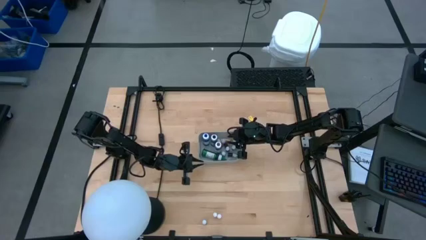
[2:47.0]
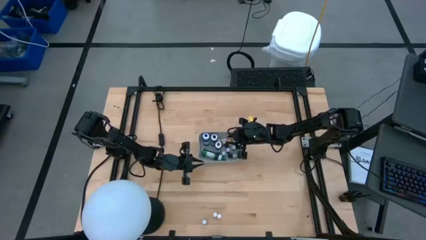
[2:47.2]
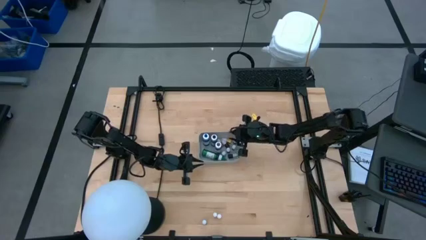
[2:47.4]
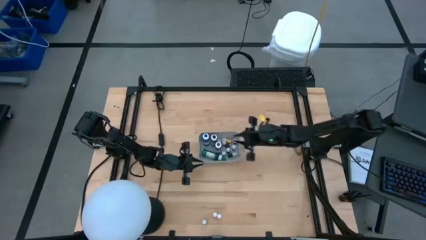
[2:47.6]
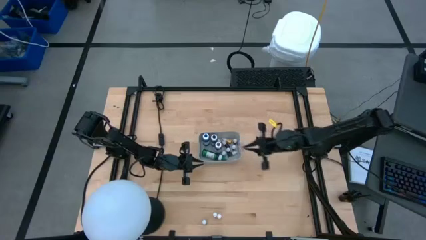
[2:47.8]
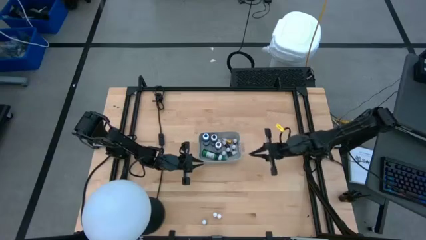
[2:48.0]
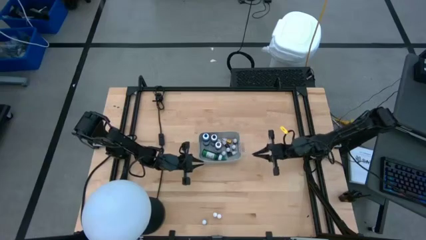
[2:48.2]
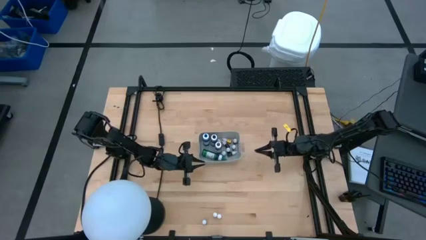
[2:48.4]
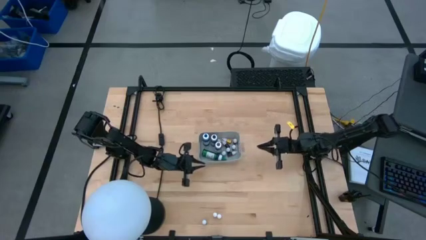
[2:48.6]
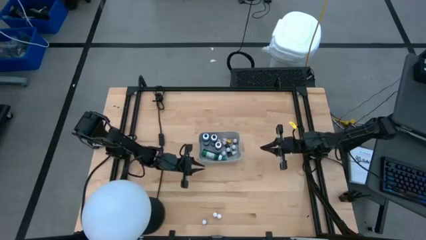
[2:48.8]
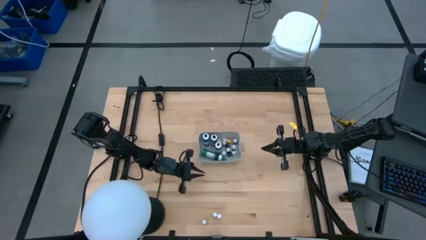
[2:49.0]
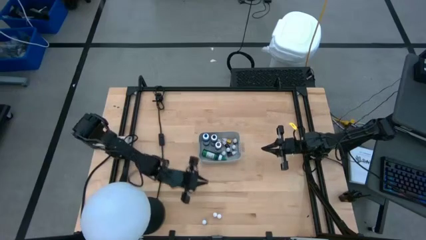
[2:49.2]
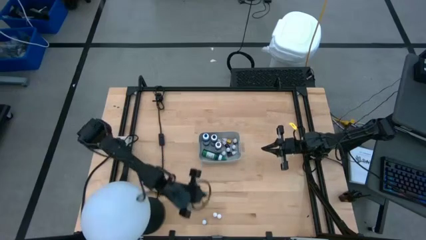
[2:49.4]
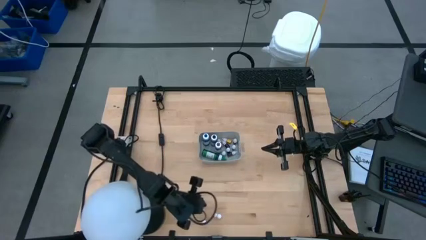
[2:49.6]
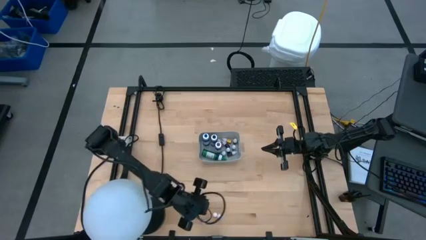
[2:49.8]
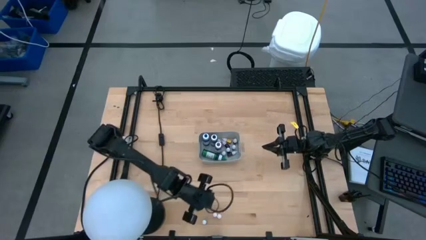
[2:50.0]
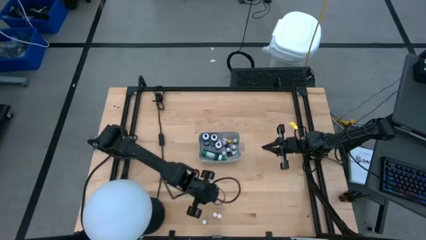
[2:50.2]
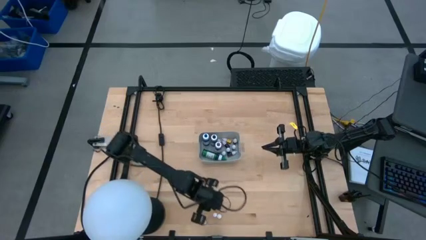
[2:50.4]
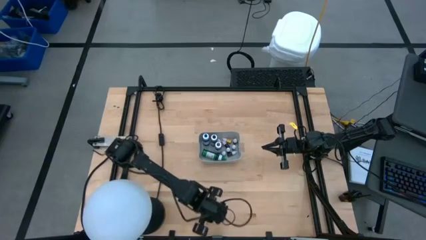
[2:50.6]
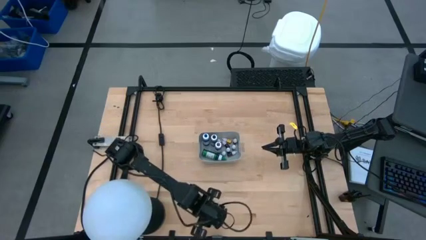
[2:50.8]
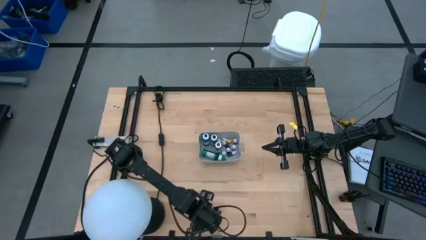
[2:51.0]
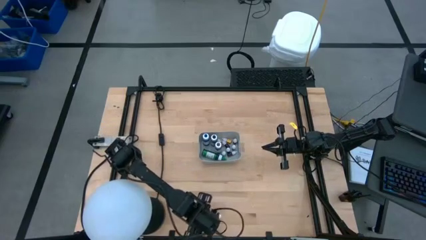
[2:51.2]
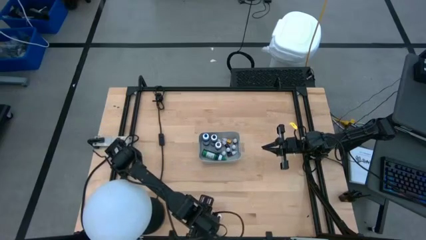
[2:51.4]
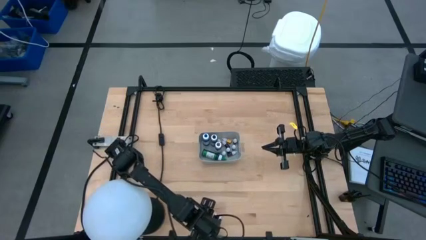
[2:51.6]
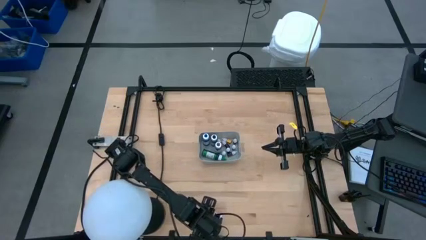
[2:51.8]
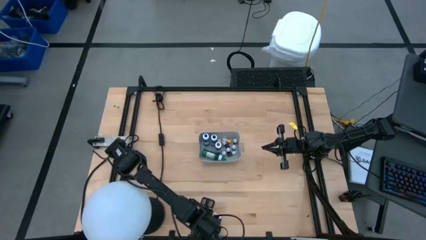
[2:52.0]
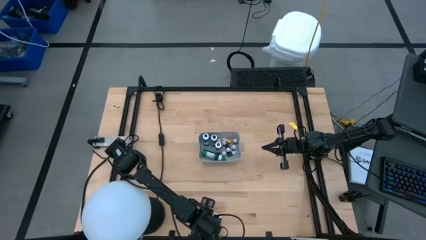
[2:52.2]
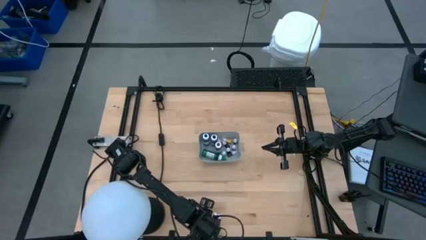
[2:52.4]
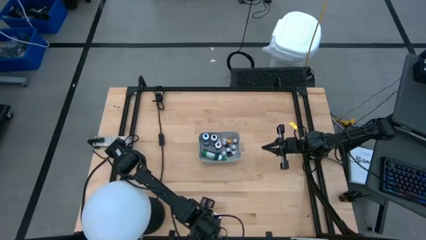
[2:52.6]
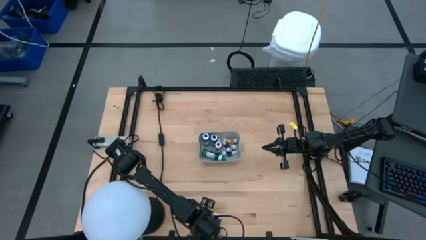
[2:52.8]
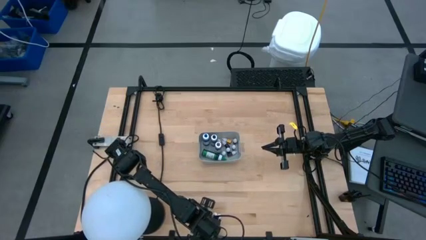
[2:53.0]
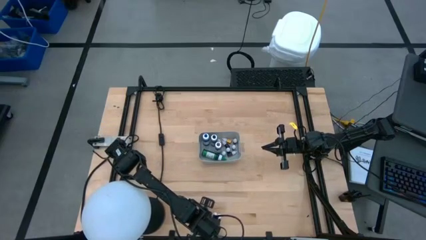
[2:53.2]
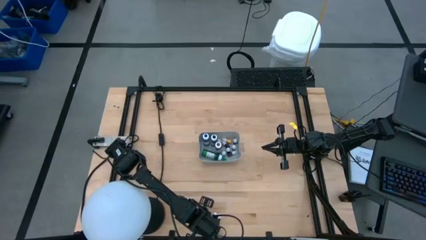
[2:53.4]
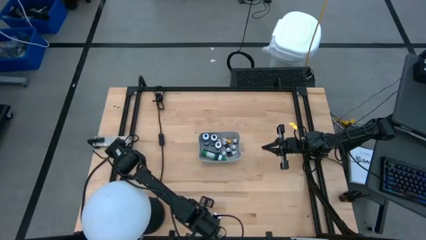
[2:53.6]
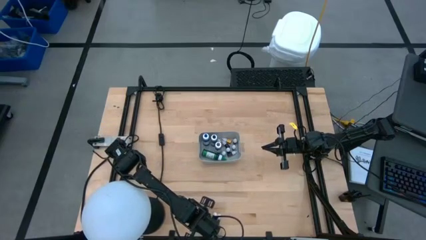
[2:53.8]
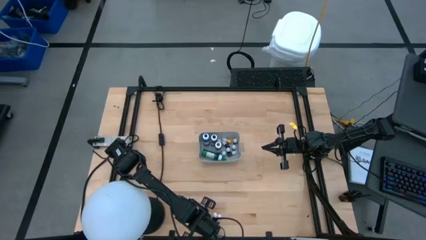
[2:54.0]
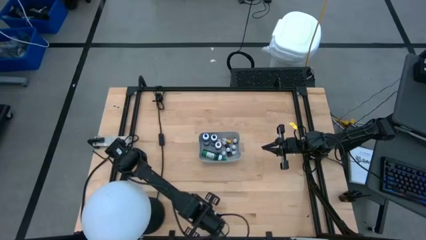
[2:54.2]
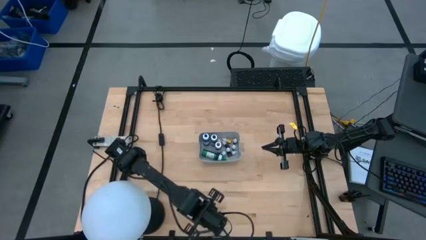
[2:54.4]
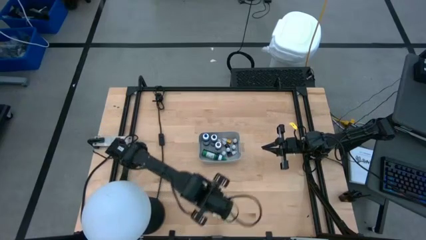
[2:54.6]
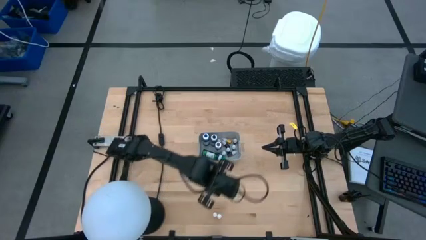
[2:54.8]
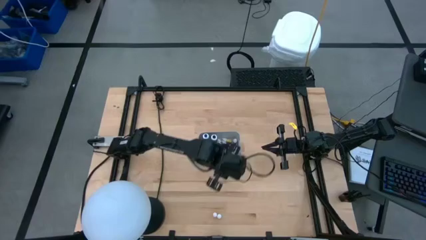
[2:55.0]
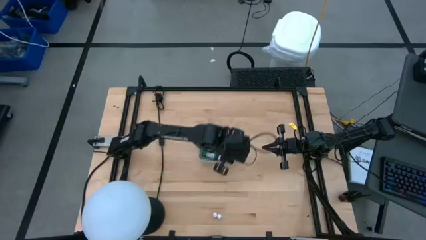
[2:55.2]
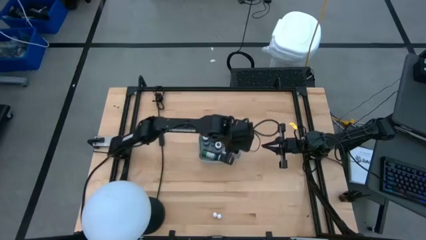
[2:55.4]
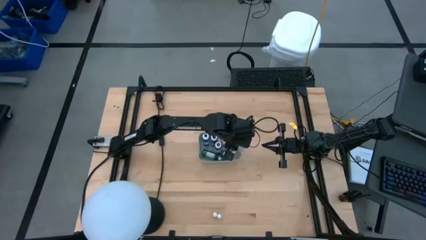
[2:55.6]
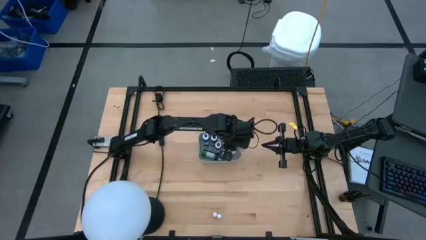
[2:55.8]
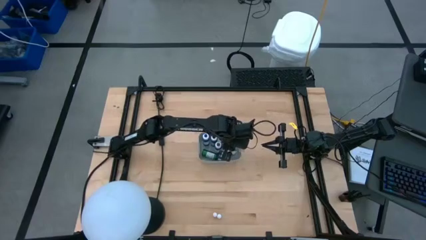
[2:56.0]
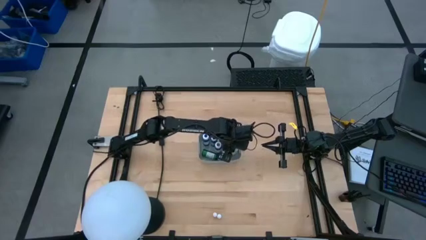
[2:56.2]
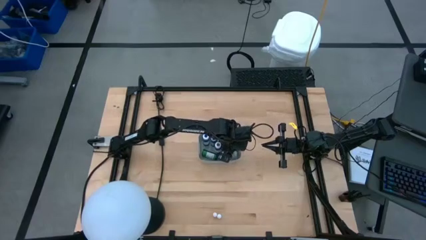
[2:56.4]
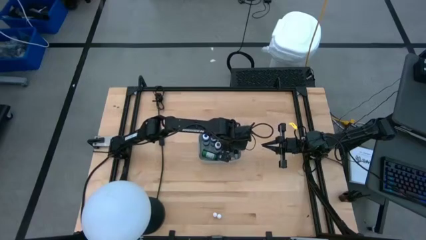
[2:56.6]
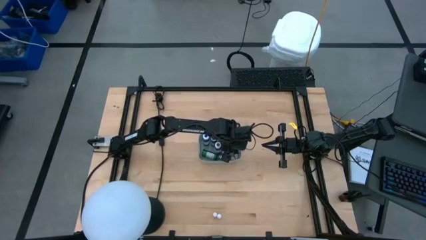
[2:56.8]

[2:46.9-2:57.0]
Task: Pick & Place food coloring
Put the small black food coloring bottle into the gray bin

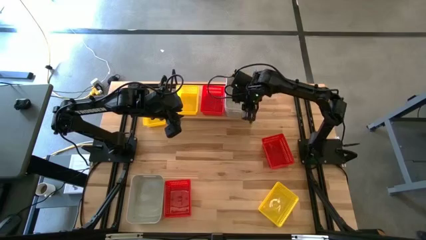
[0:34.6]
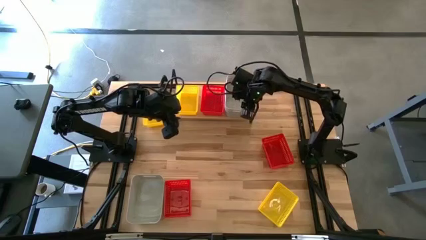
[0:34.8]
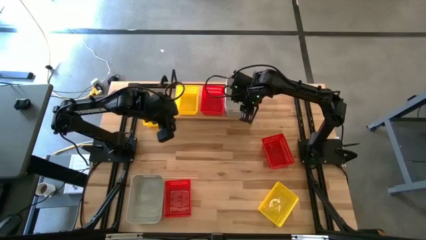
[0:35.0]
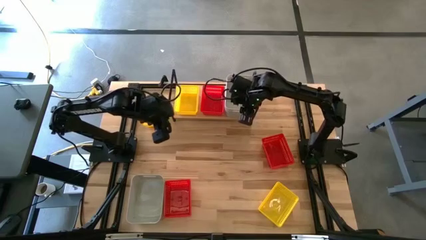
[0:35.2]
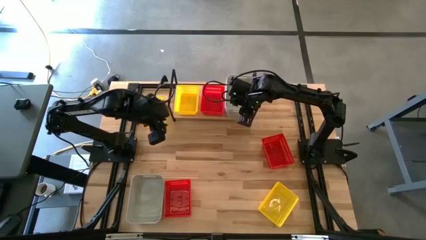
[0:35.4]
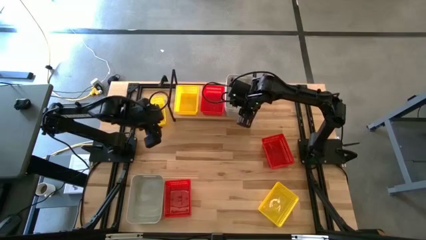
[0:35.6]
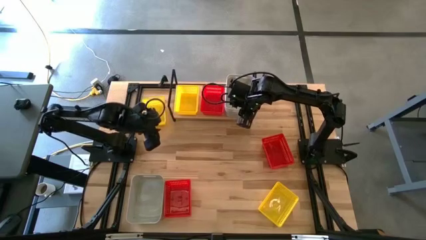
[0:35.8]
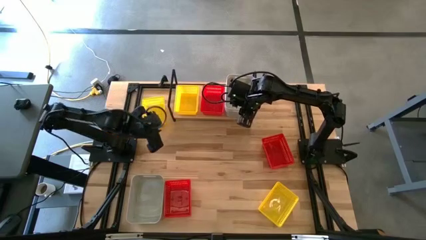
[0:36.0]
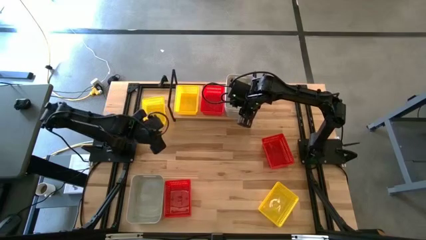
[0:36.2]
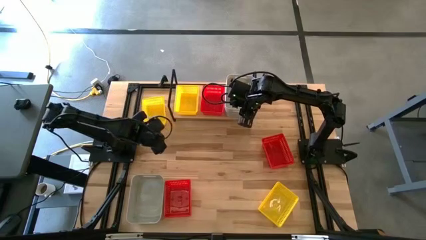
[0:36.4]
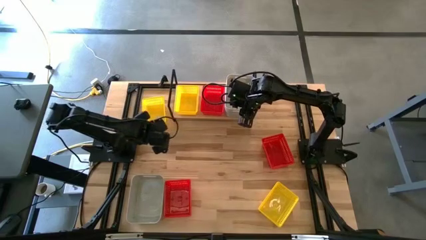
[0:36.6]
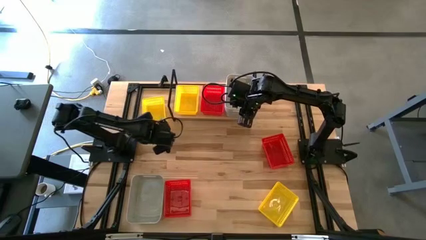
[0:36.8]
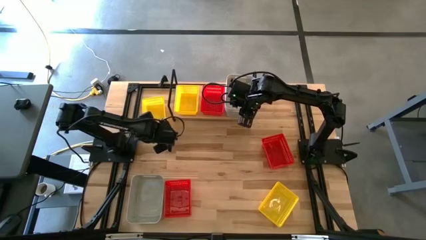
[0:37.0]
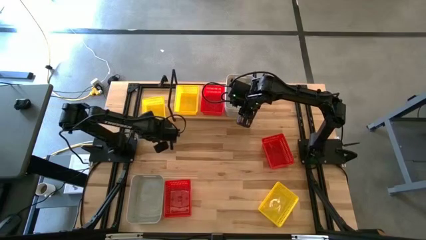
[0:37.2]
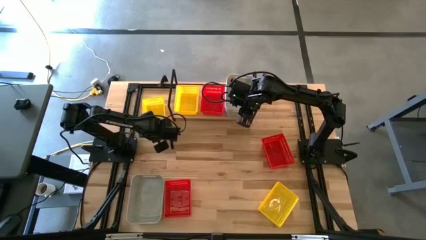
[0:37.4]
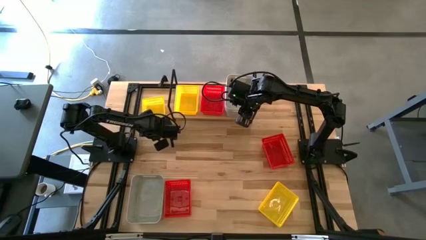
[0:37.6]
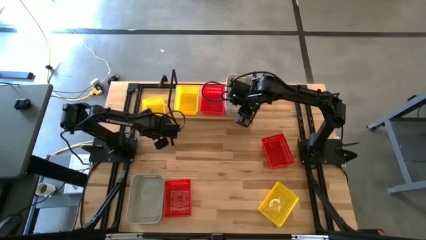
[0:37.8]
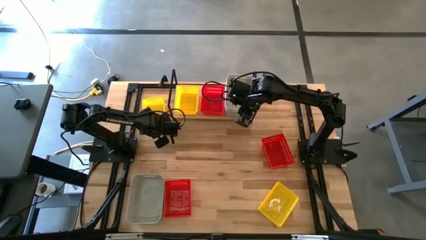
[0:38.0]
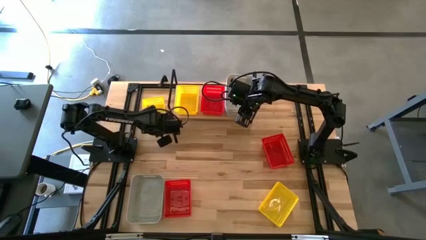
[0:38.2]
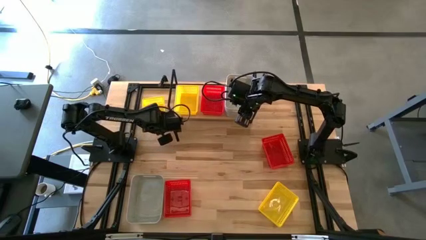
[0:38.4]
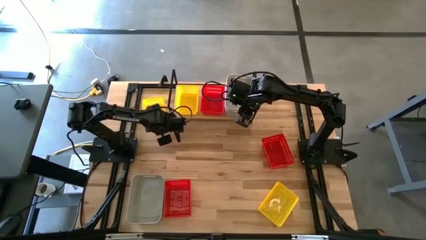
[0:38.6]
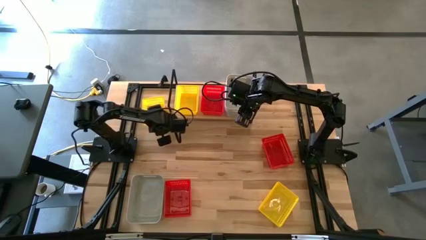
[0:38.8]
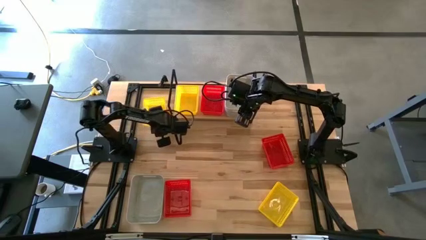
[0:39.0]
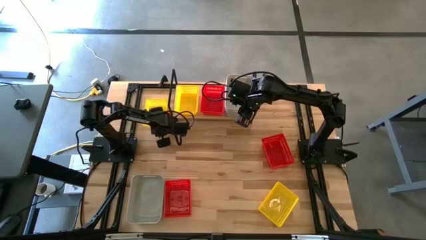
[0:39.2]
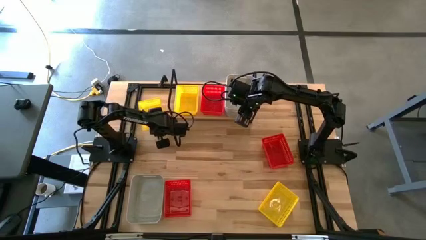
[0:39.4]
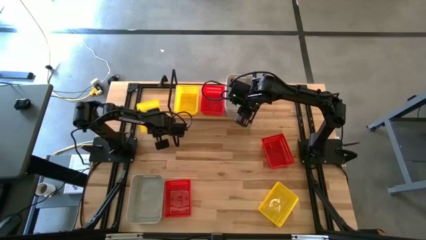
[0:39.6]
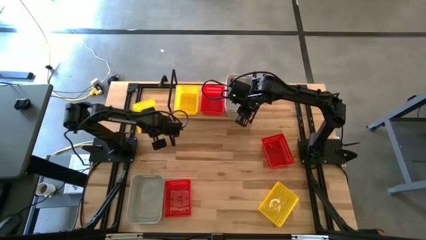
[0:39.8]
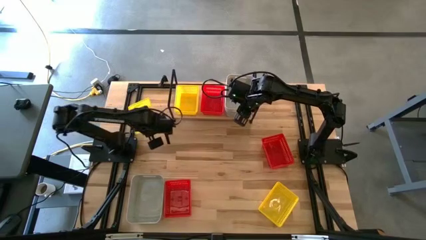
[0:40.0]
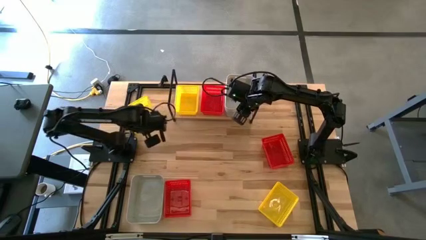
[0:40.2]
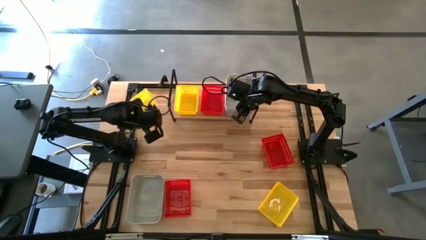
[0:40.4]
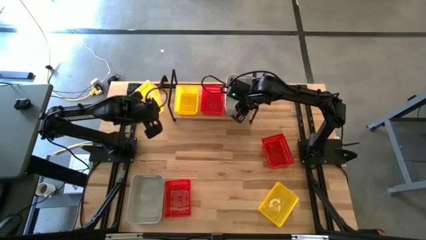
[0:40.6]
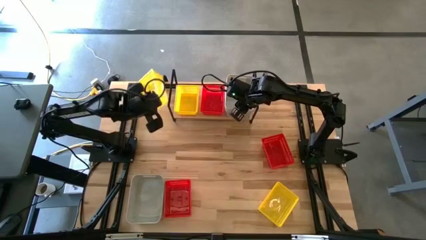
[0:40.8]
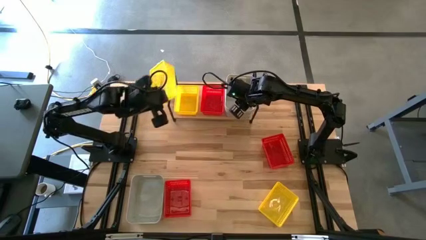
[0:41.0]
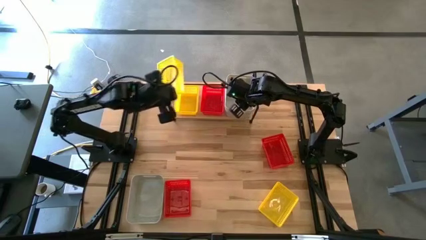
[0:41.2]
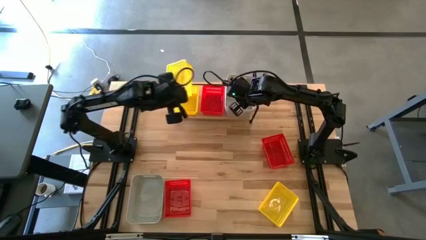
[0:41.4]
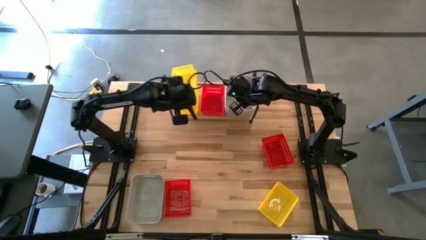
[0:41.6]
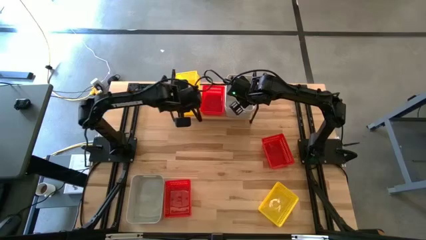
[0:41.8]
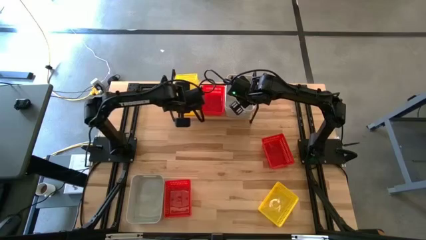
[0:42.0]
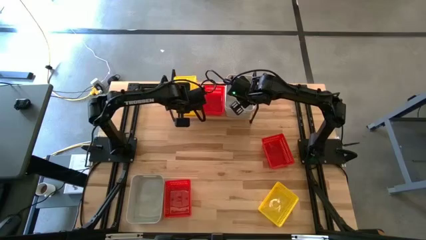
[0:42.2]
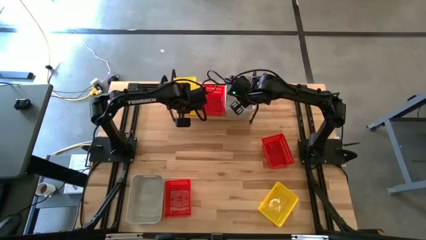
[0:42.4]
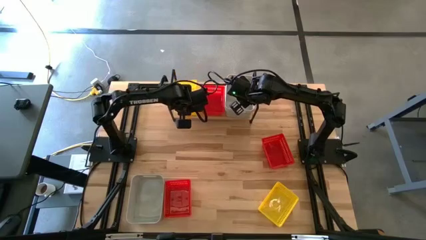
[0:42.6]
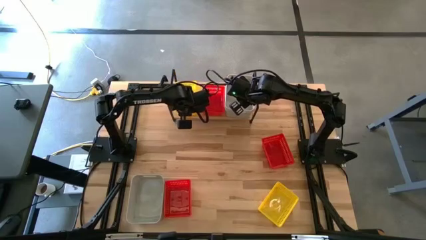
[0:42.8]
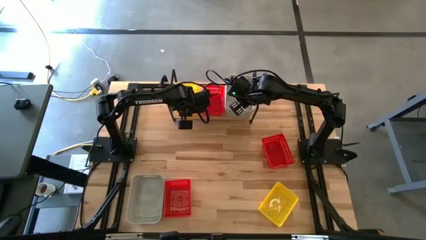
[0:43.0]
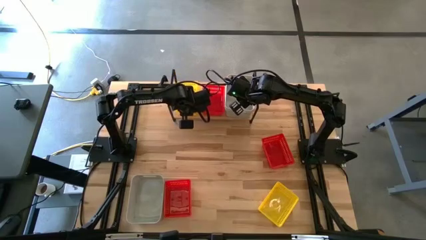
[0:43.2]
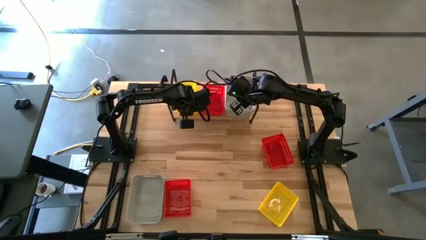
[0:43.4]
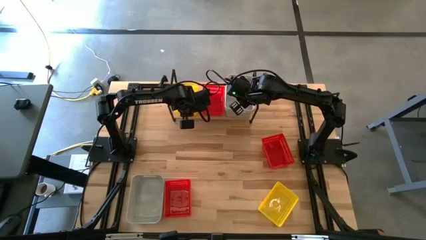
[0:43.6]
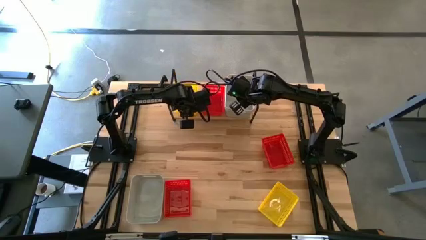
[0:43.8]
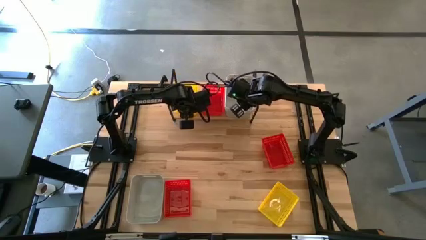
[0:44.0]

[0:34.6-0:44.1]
Task: Stack baskets on shelf by color
Stack the top yellow basket on top of the yellow basket on the shelf
